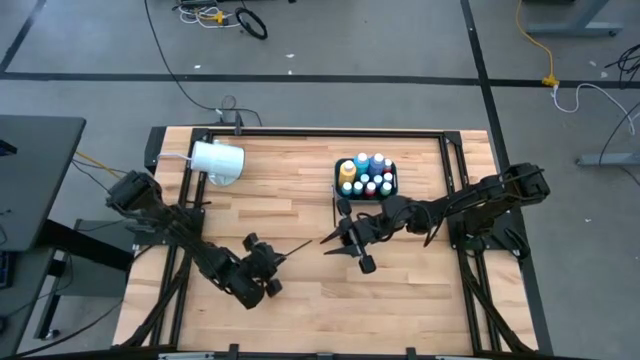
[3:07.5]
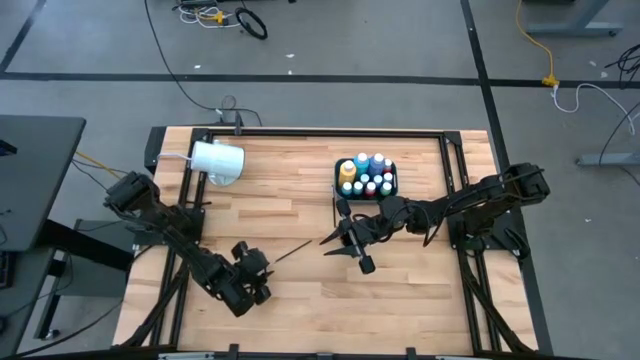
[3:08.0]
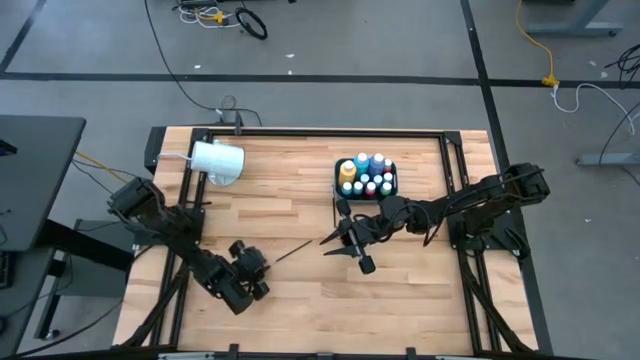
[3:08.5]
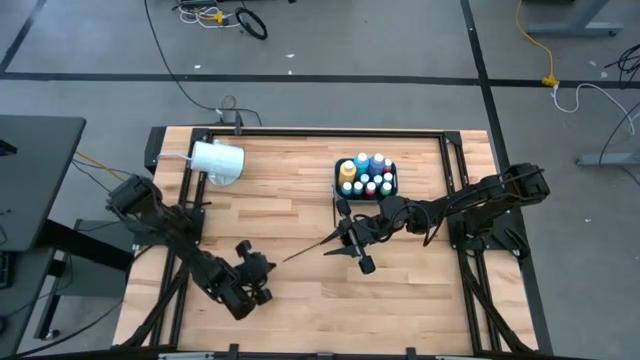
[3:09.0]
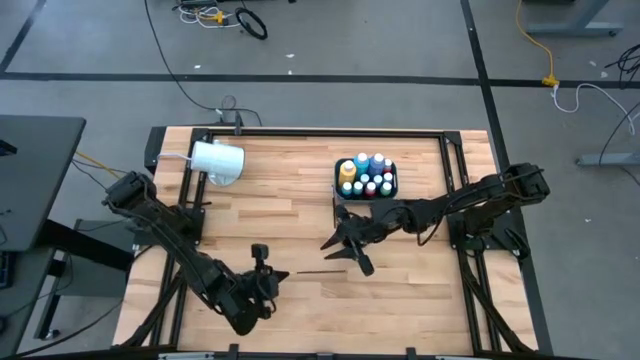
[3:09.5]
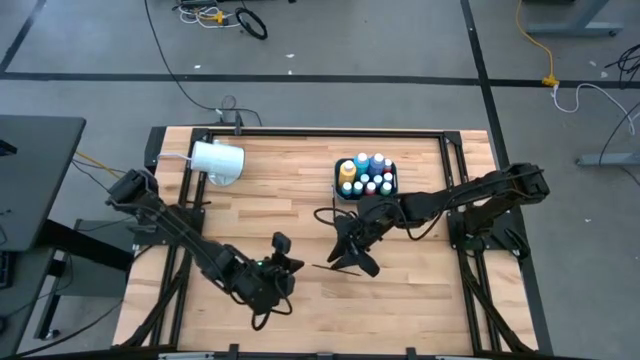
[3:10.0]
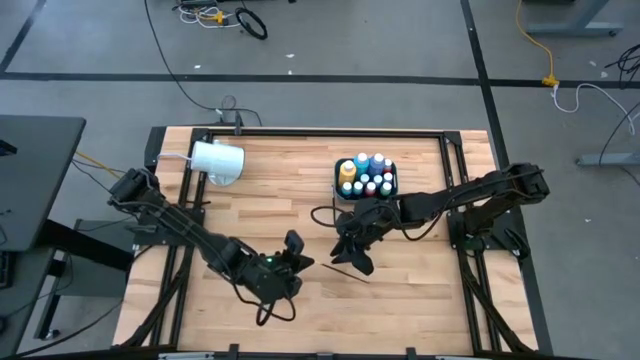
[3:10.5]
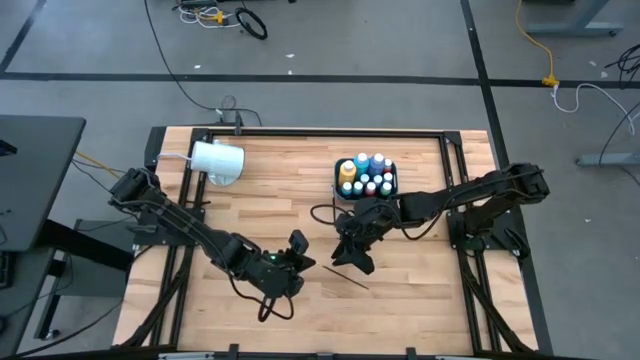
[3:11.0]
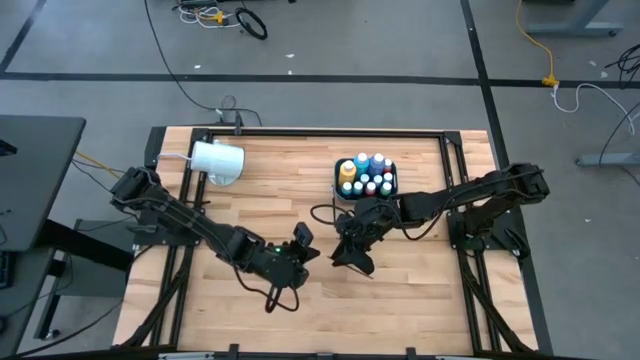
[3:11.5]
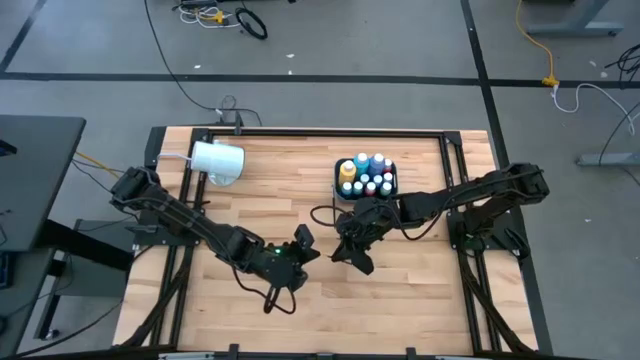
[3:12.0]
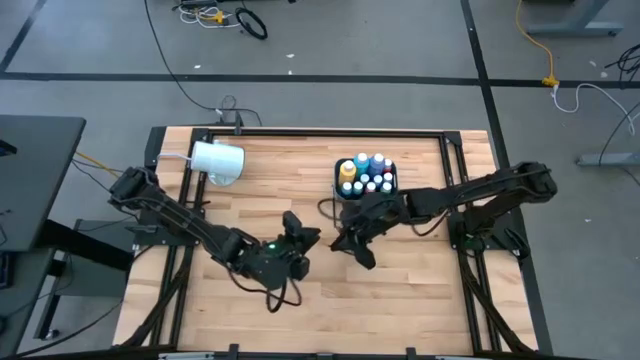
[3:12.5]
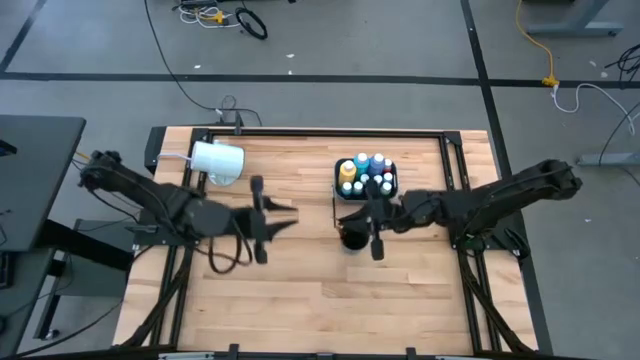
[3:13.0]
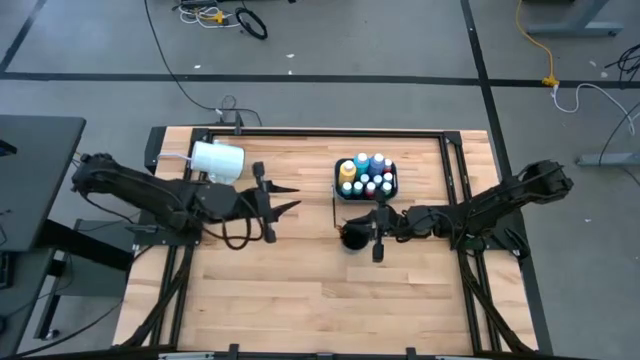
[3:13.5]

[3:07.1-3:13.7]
Task: Pick & Place Paint Supplies
Put the gold paint brush into the cup

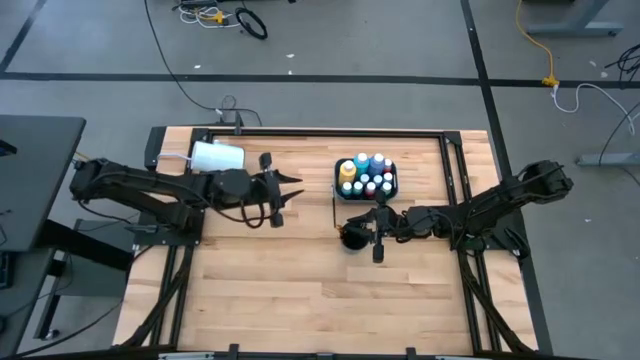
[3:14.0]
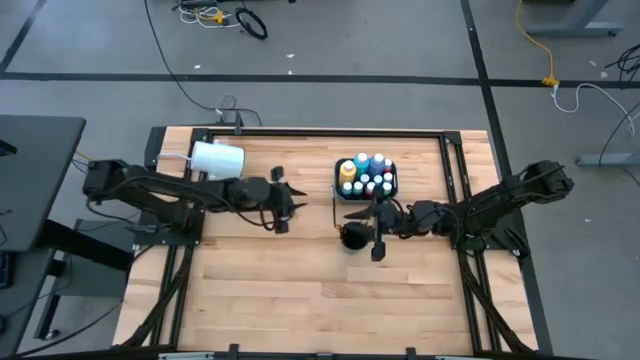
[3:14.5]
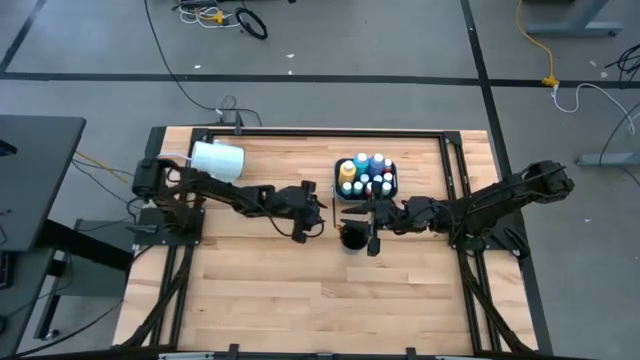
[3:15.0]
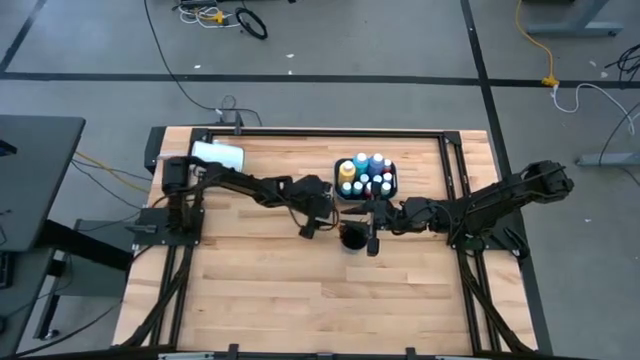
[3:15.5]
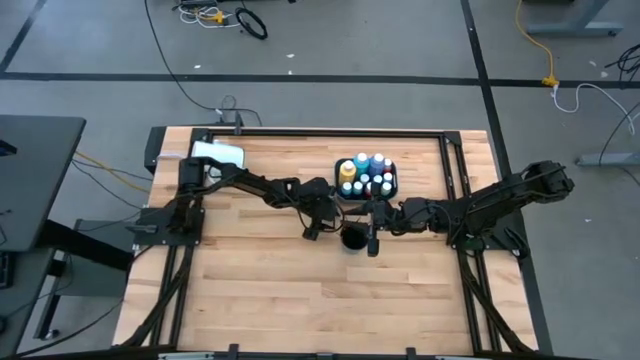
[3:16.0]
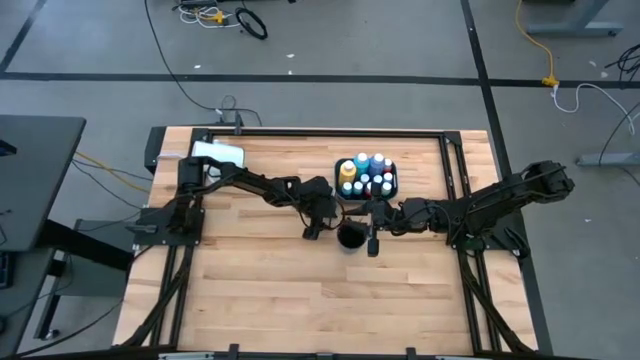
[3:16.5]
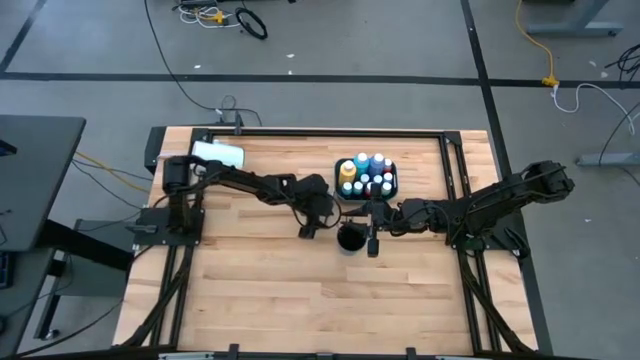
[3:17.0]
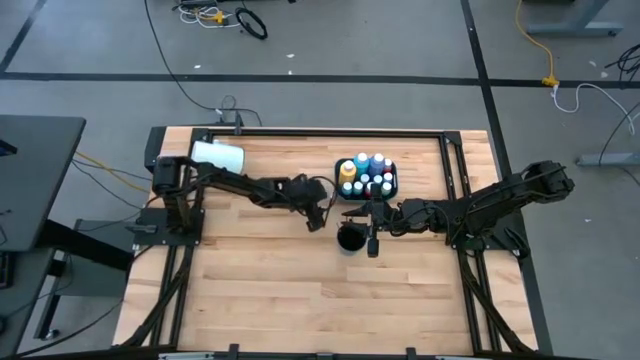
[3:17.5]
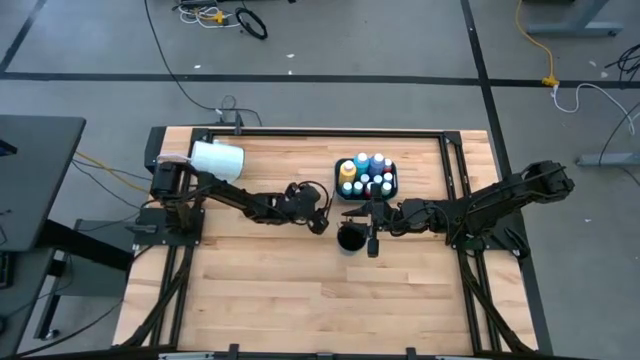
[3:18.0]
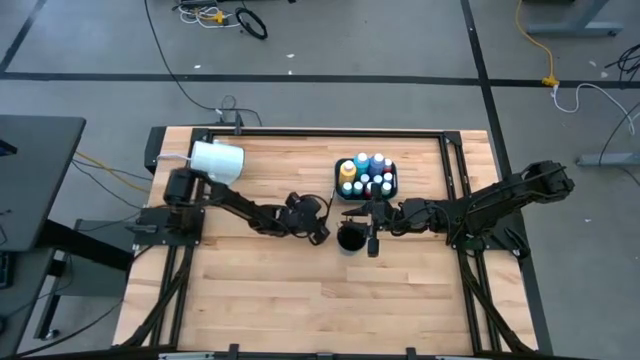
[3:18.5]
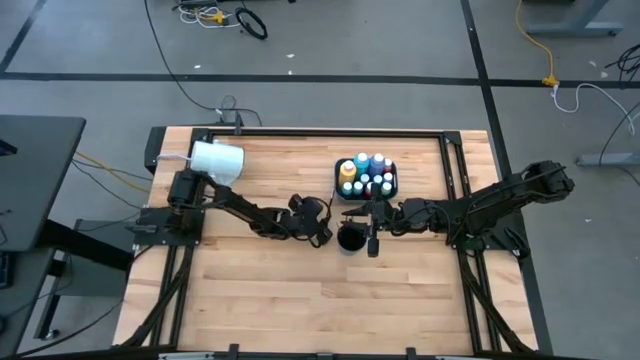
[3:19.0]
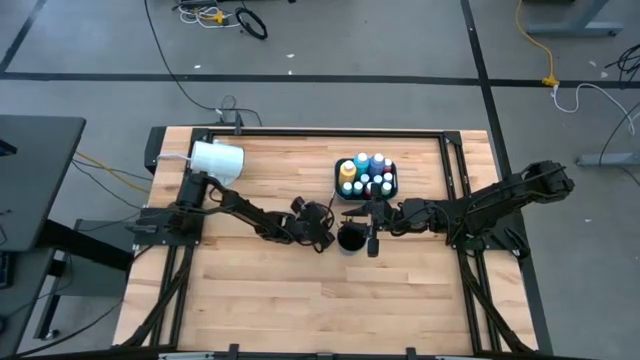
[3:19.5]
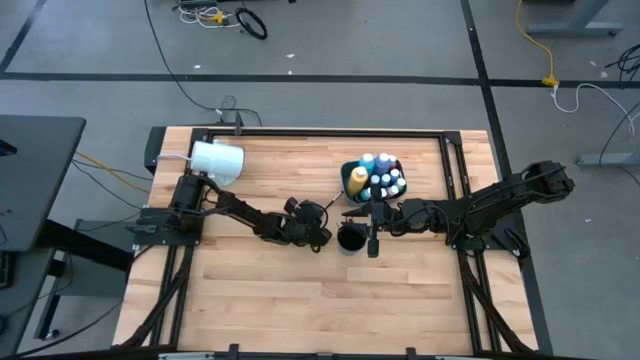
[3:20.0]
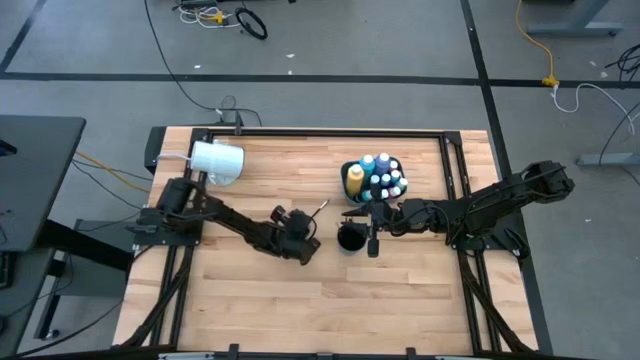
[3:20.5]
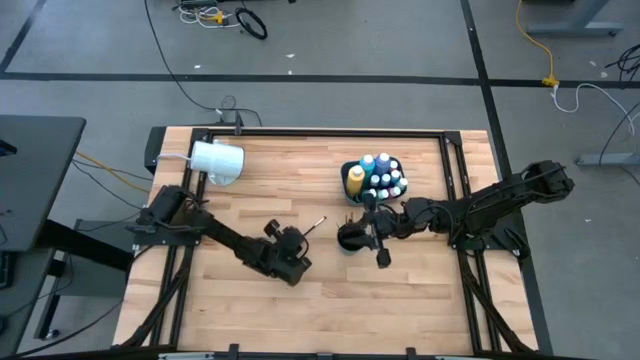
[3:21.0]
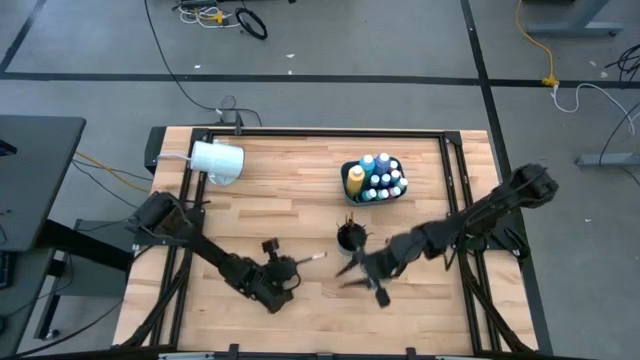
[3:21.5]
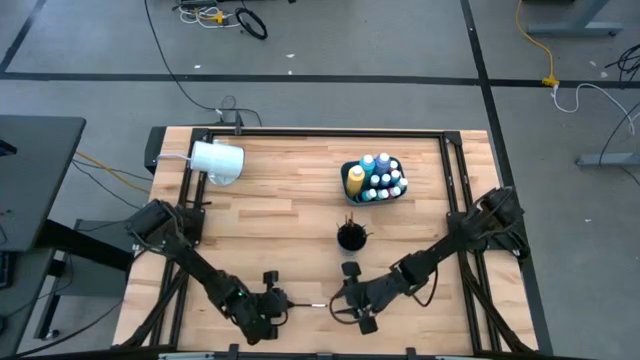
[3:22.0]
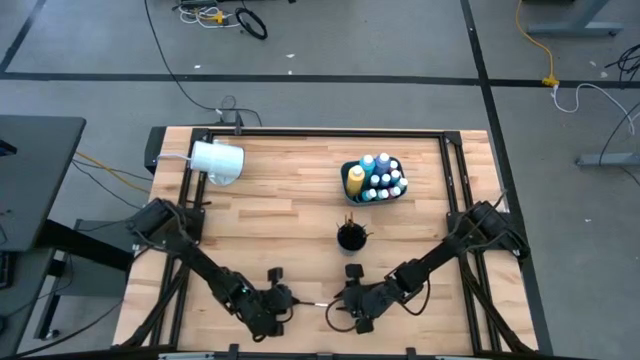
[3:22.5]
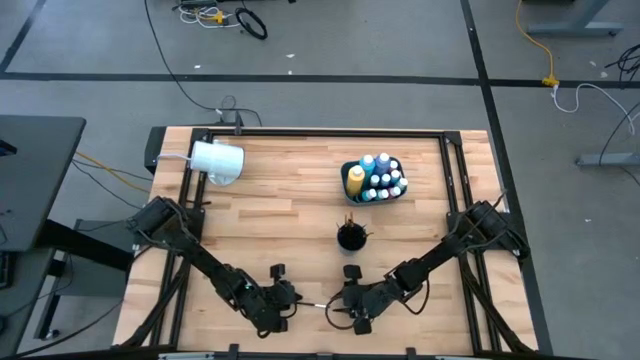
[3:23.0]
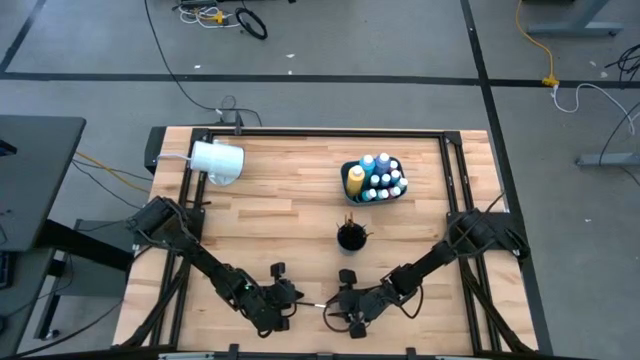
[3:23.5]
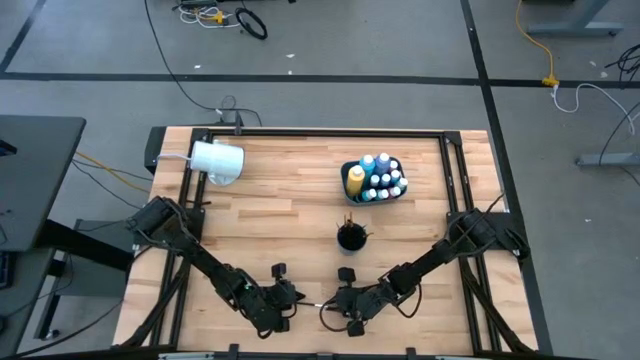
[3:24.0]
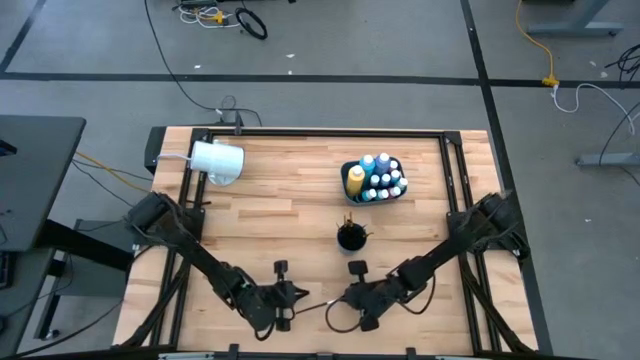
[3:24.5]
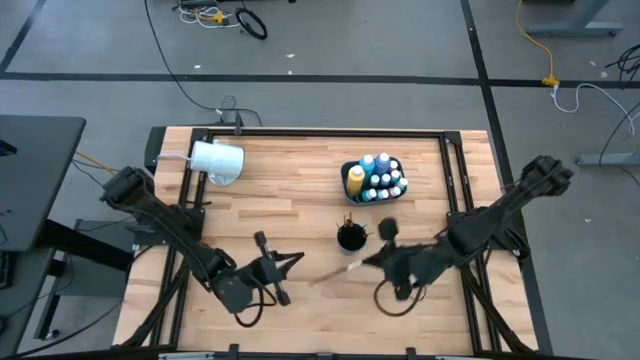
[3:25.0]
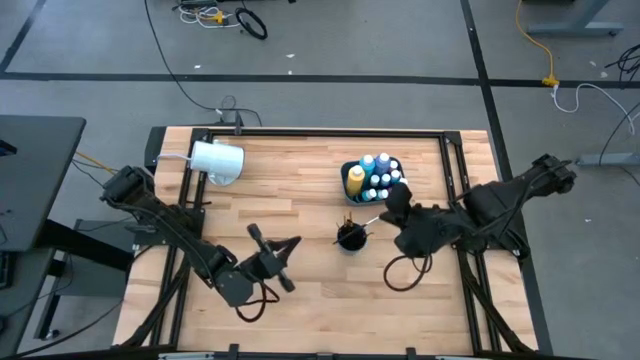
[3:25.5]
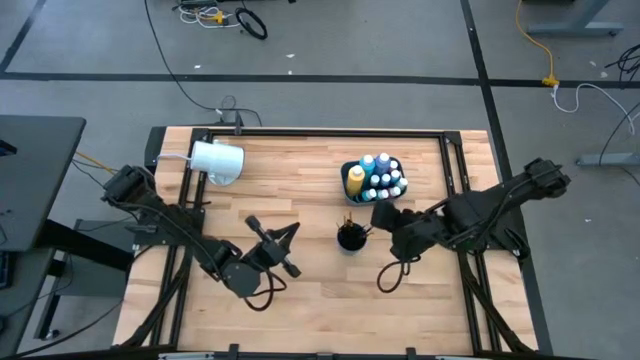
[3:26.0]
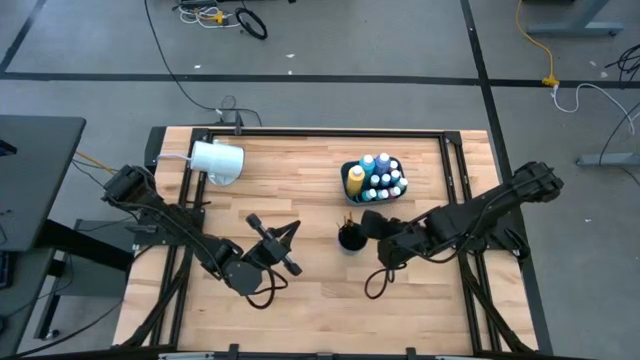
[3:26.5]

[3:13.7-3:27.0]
Put the silver paint brush into the cup

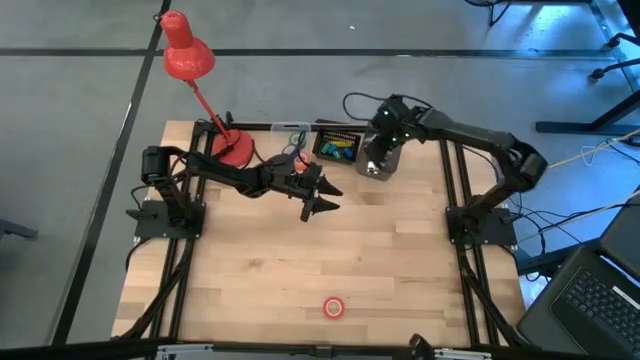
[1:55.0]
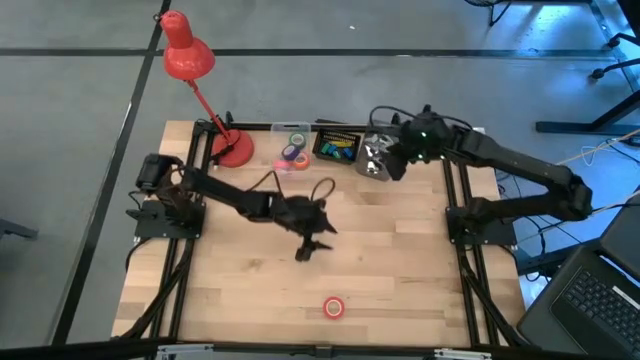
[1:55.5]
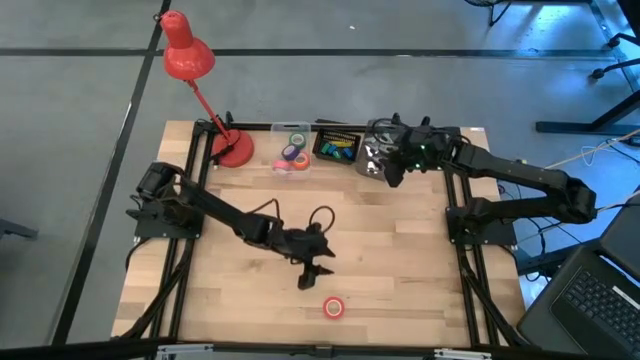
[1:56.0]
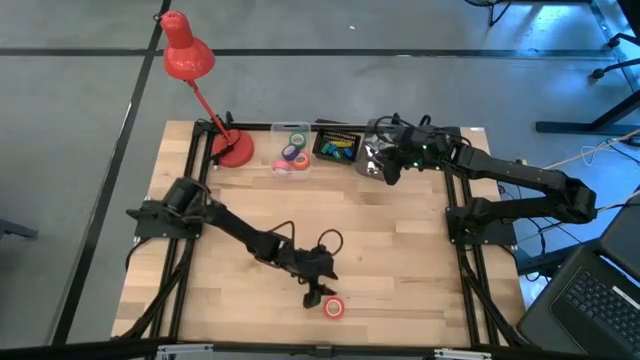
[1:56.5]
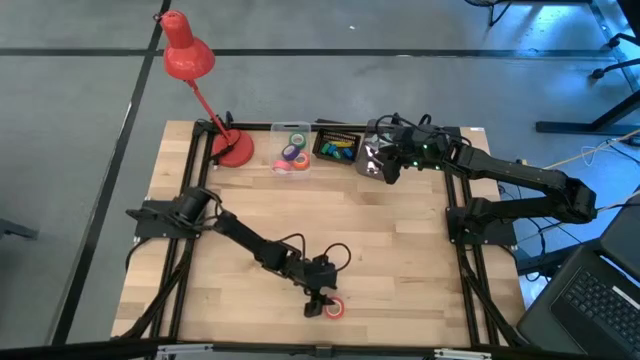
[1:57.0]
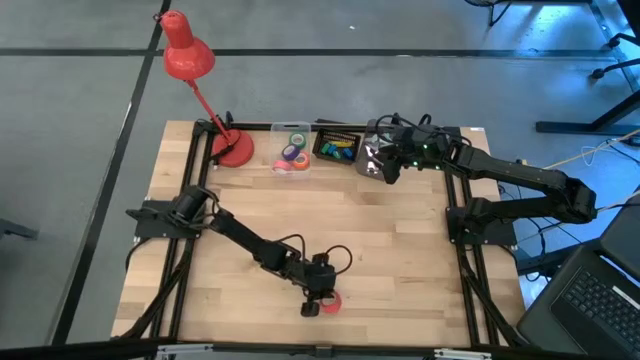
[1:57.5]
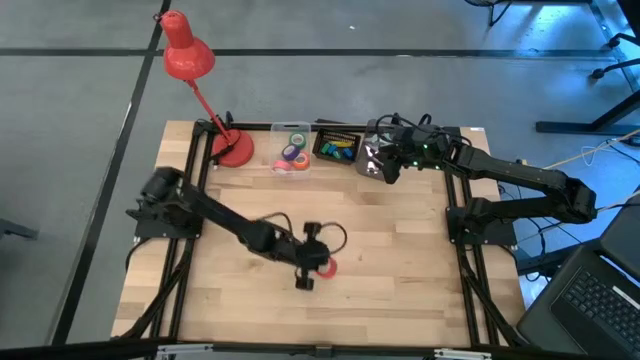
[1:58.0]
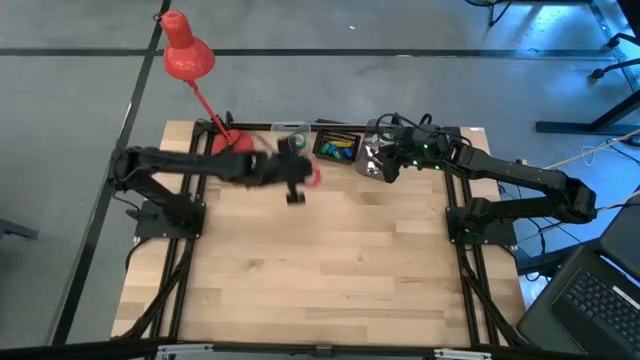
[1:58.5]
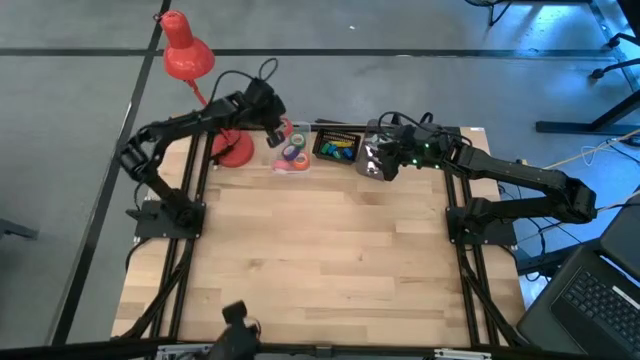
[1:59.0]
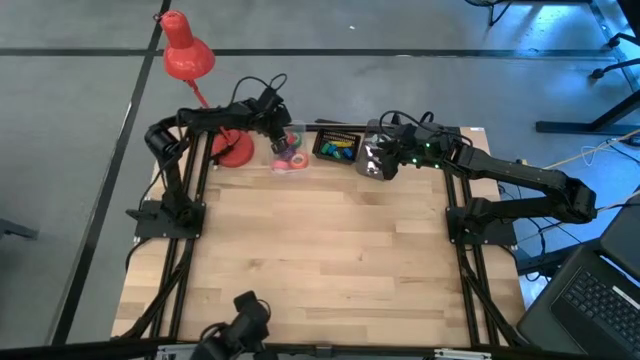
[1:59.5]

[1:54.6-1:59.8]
Task: Pick and place Stapler, Stapler remover, tape
Put the red tape into the transparent bin
